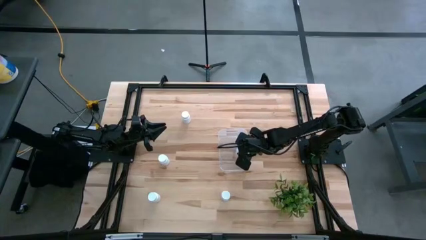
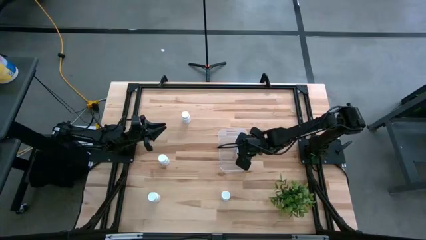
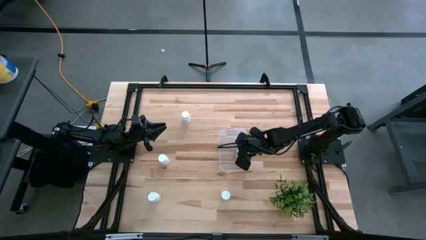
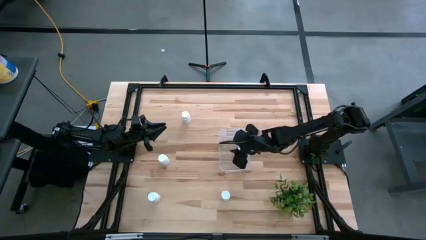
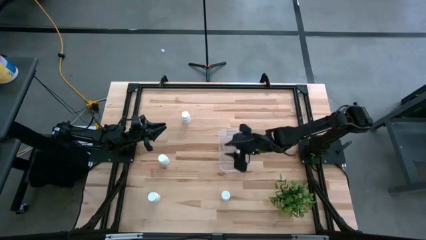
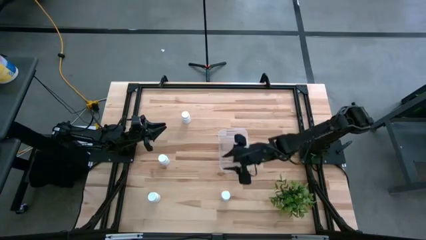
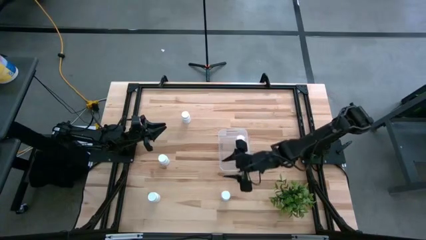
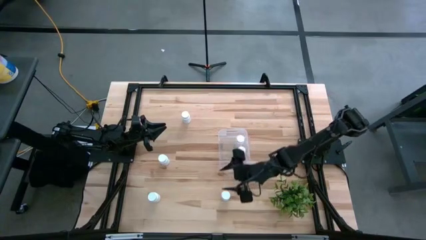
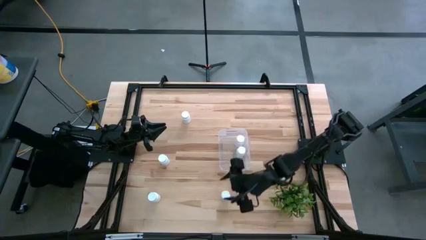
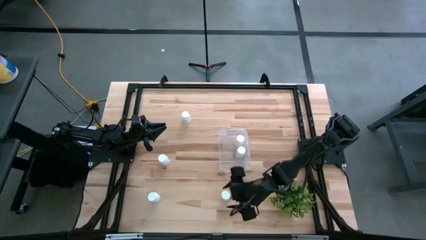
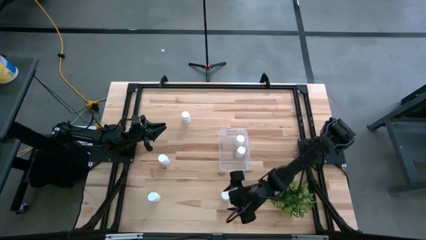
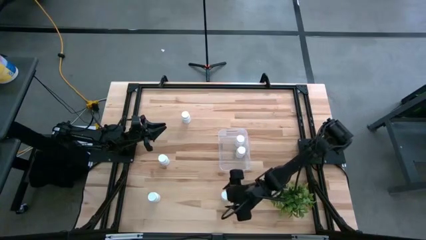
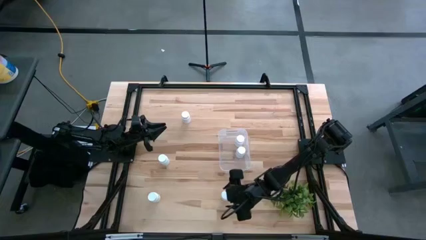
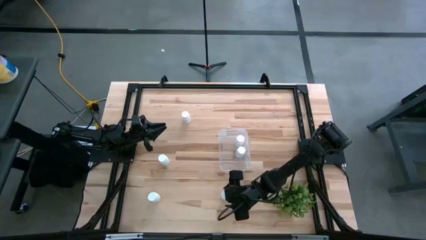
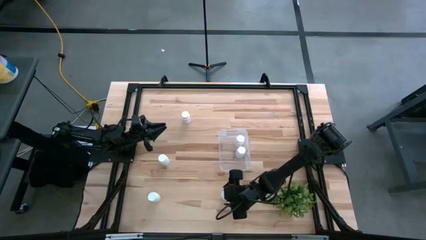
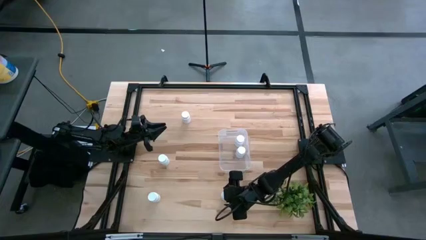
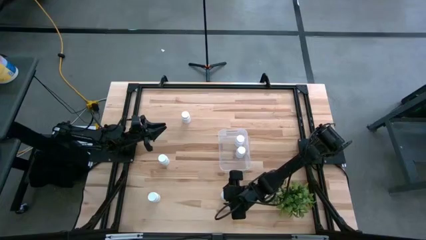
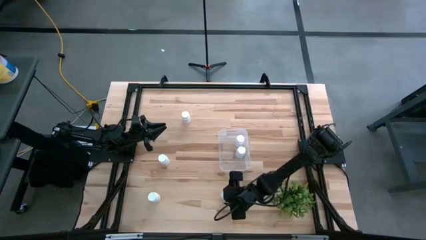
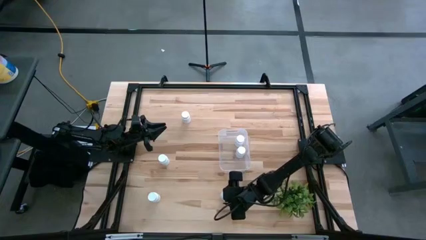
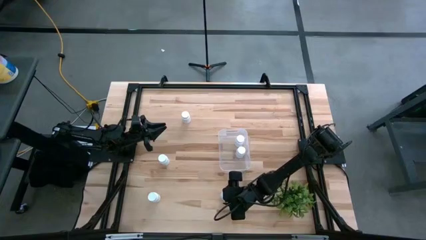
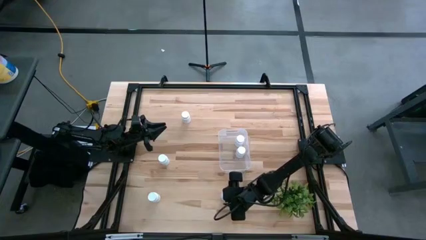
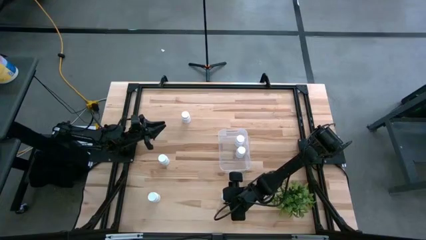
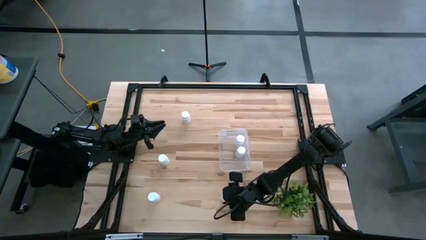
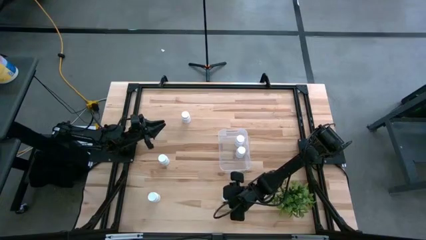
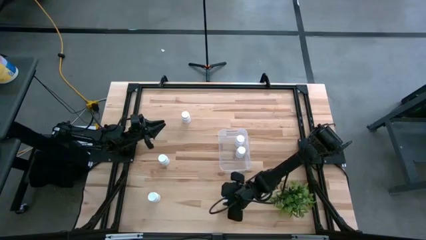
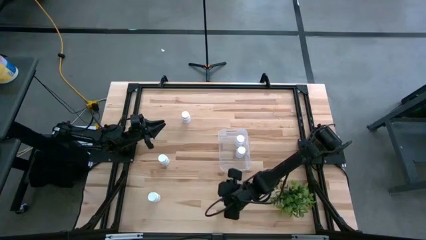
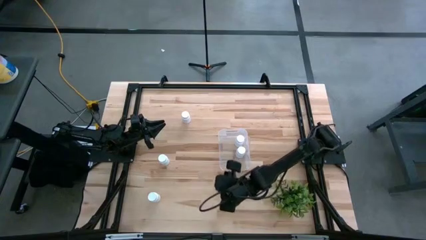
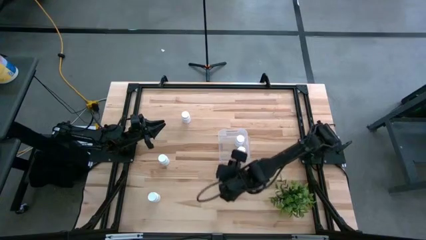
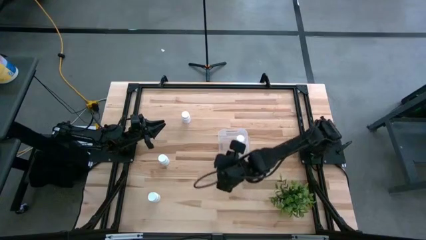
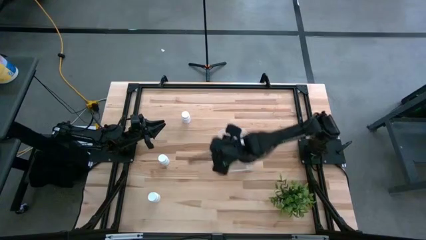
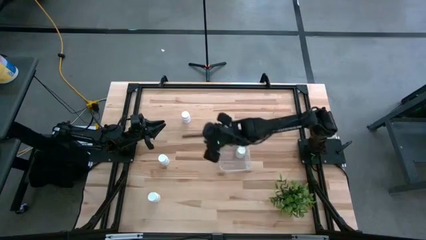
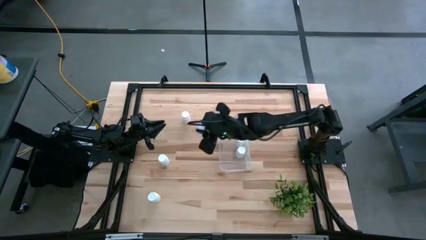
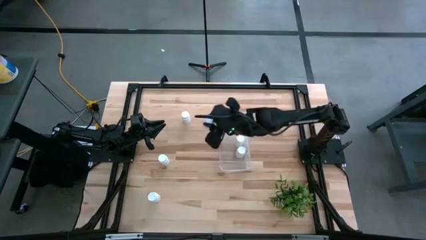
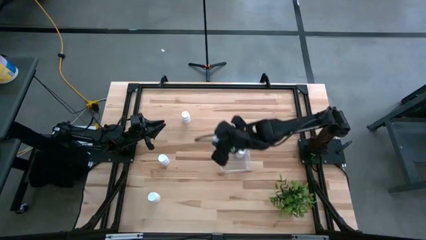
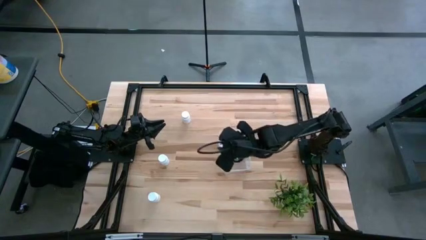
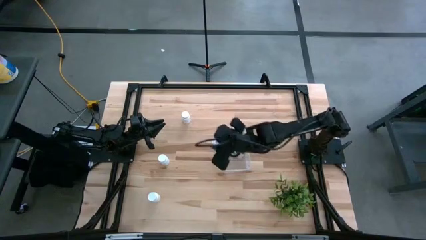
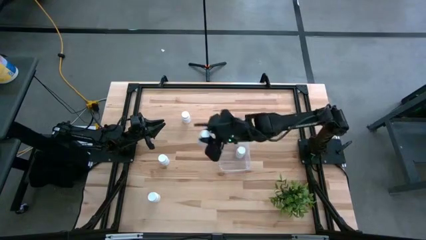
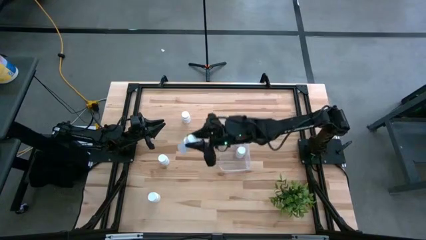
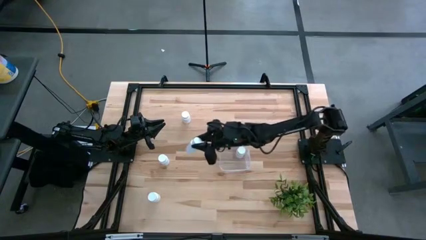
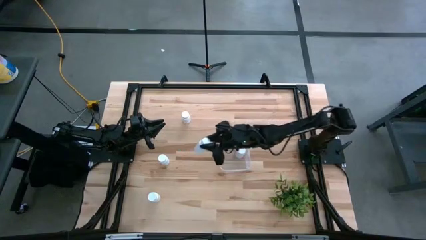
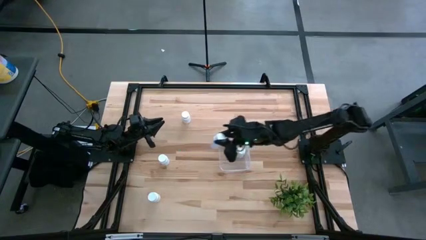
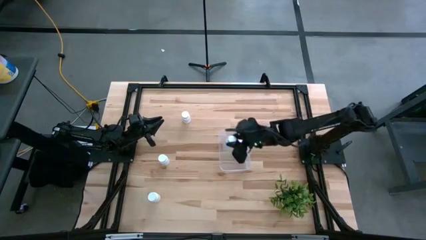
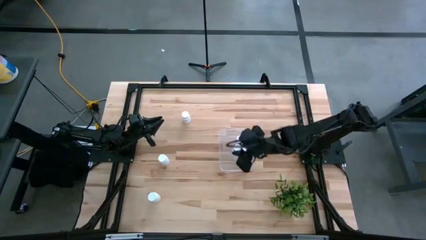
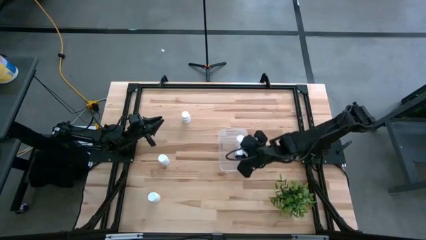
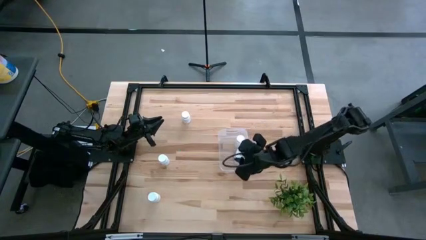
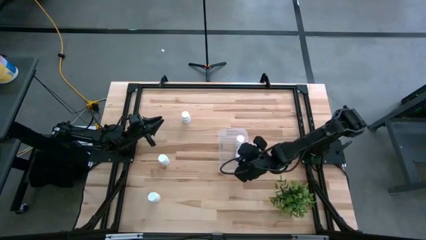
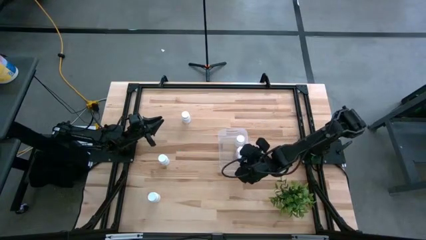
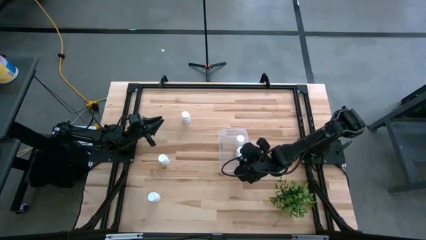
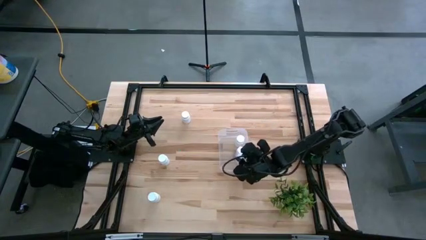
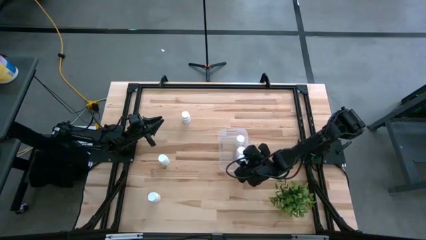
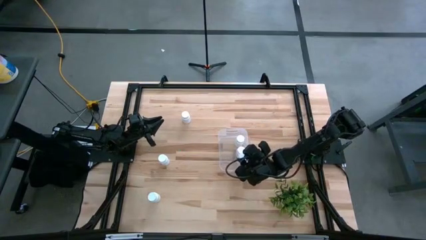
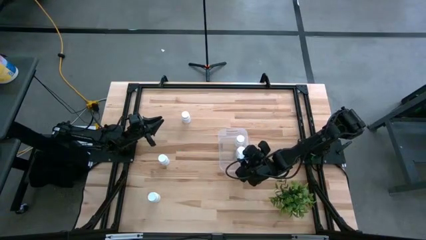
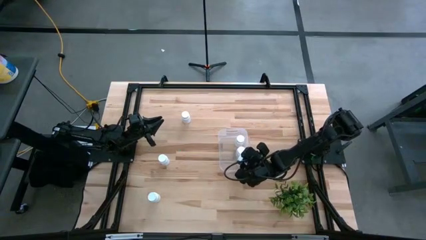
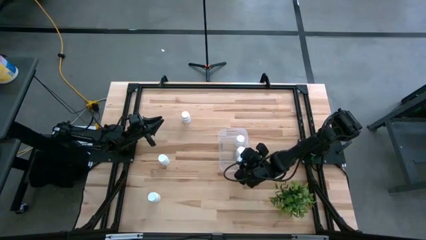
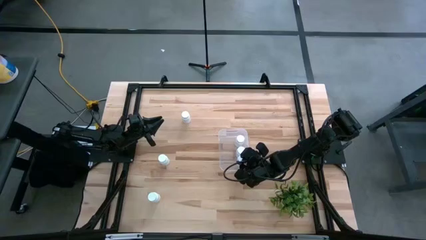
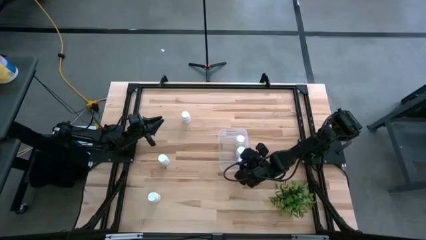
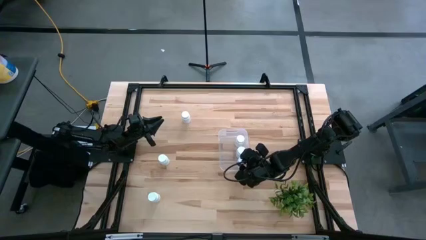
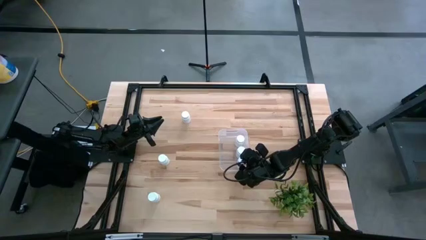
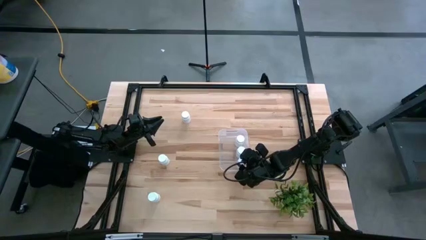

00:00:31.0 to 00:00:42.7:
Task: Pick and place pill bottles into a basket
Put the pill bottle into the bin

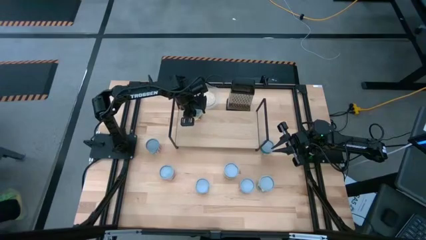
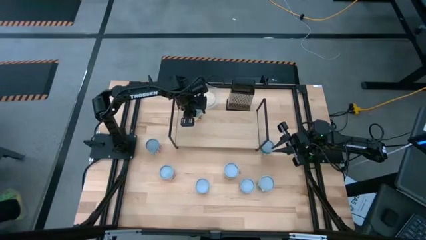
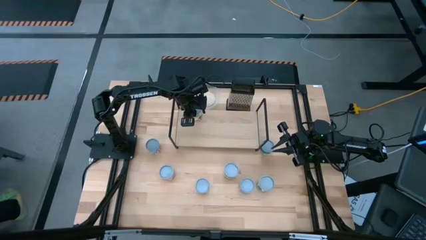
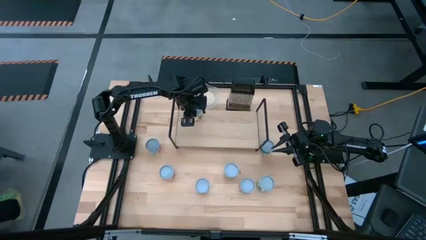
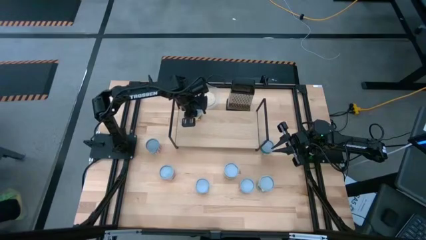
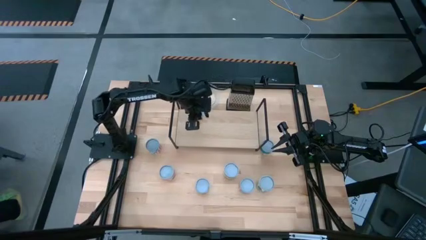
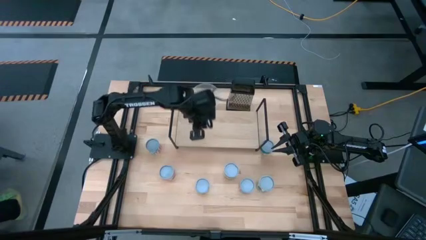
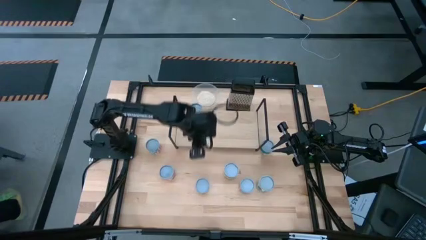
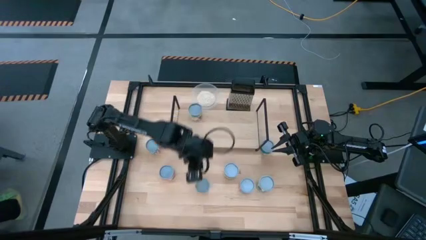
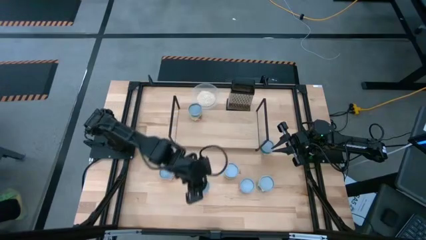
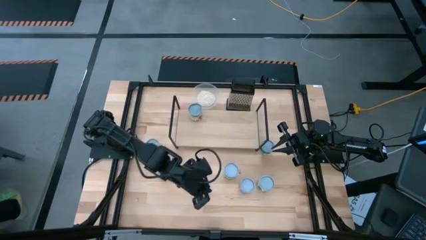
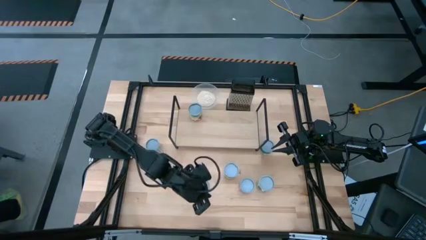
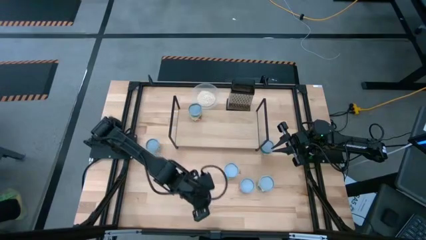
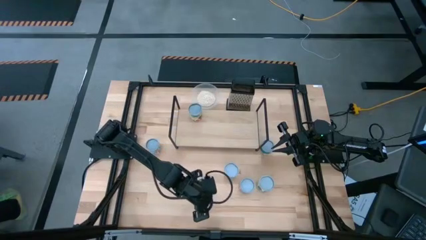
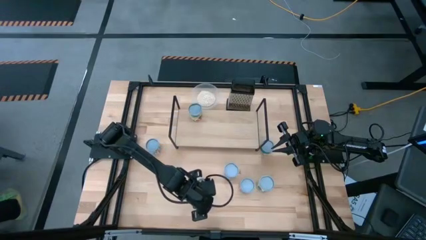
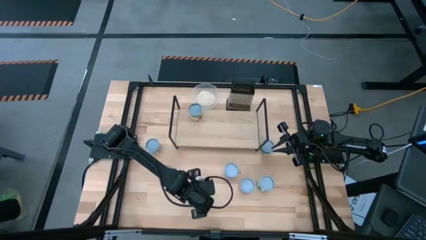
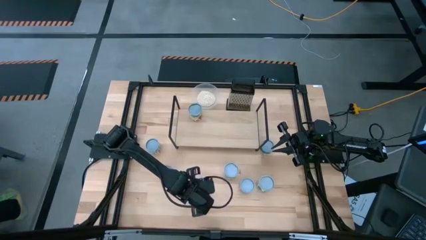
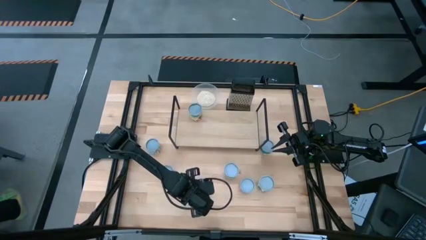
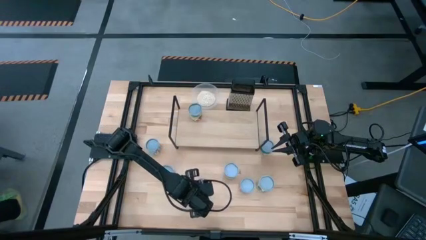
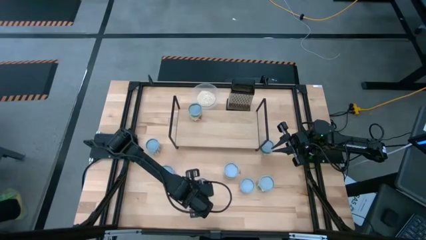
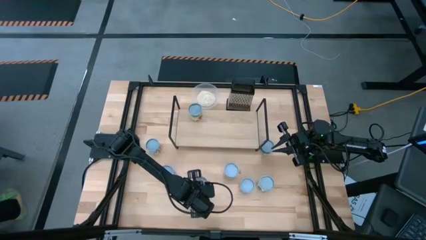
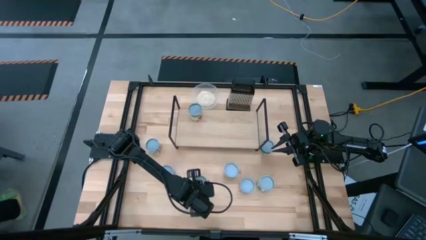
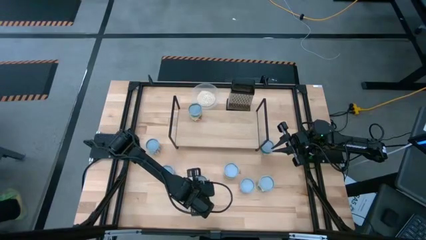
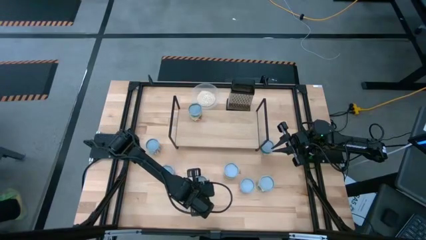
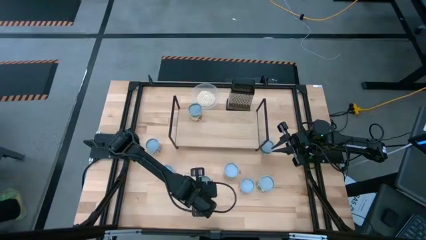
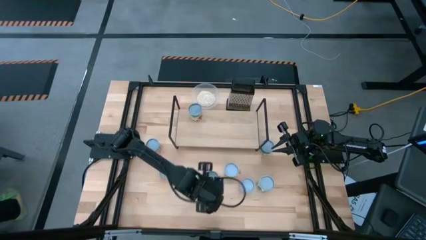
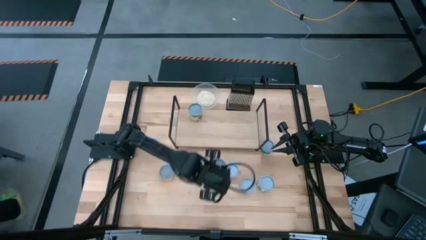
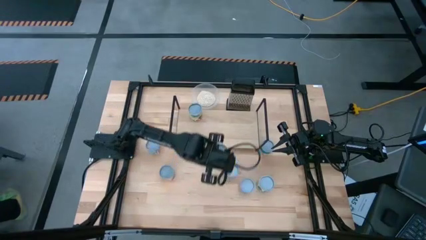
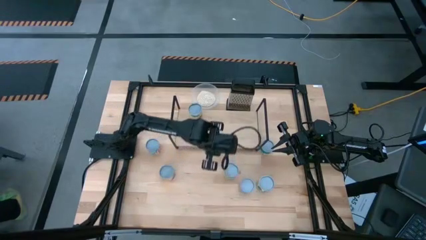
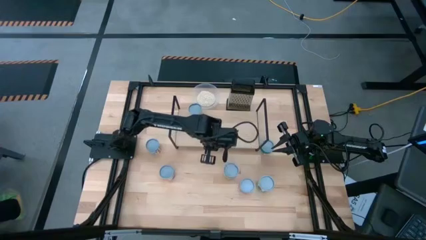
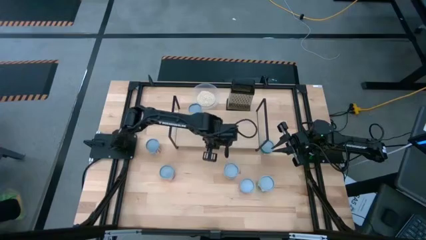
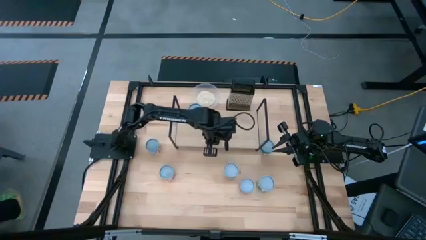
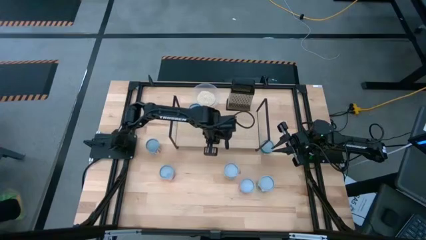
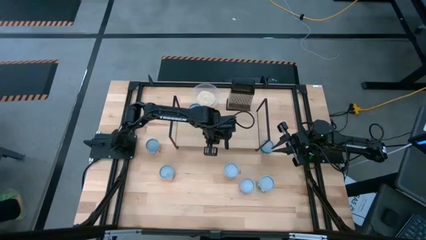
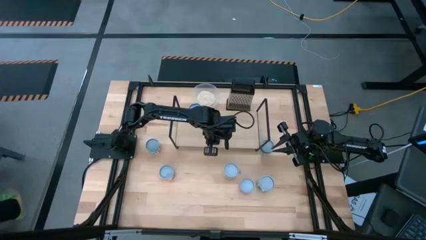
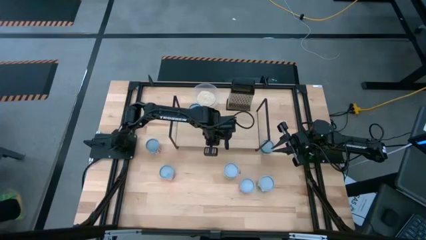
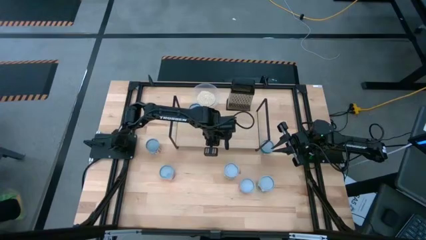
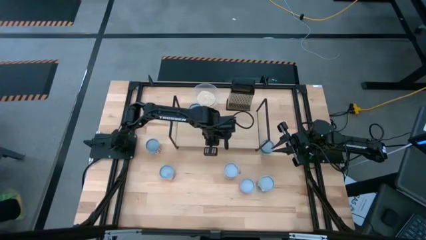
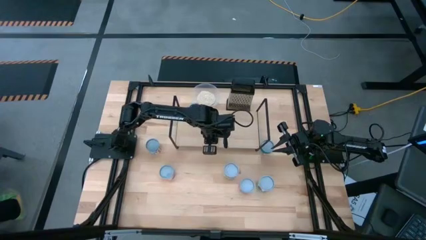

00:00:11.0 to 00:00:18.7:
Task: Pick and place cans onto a shelf
Put the canned diced tomatoes on the shelf
